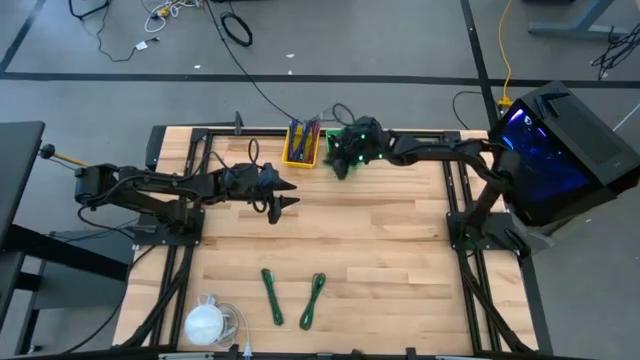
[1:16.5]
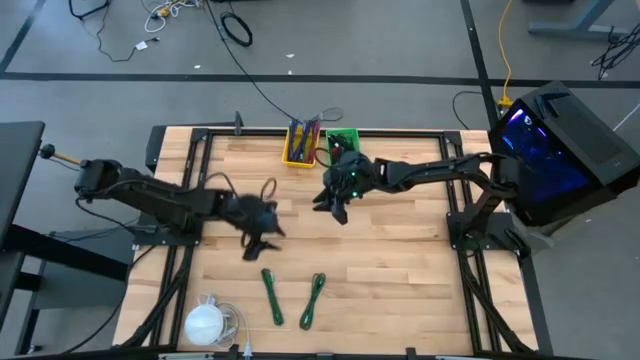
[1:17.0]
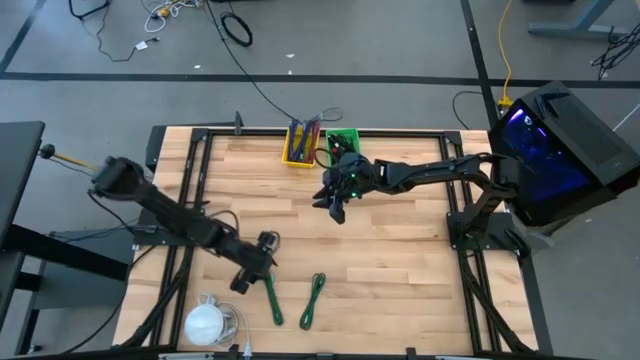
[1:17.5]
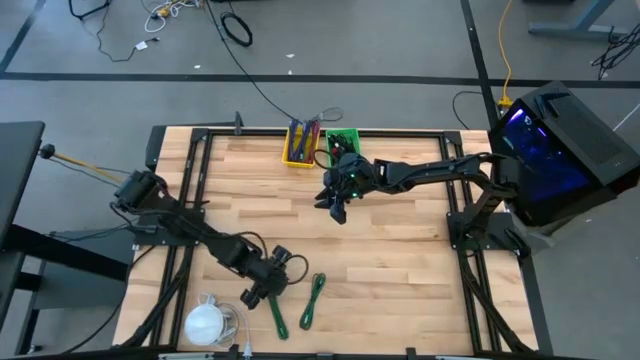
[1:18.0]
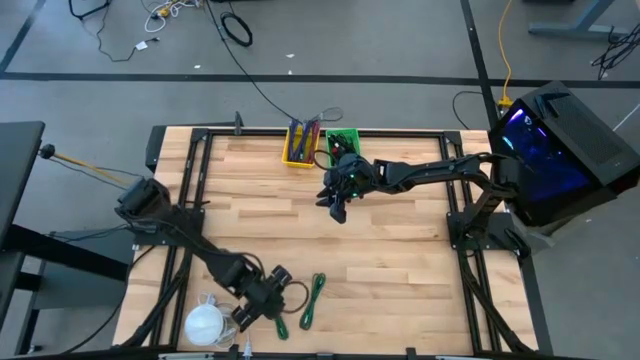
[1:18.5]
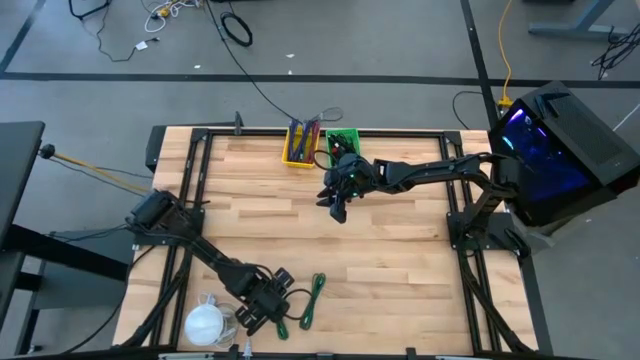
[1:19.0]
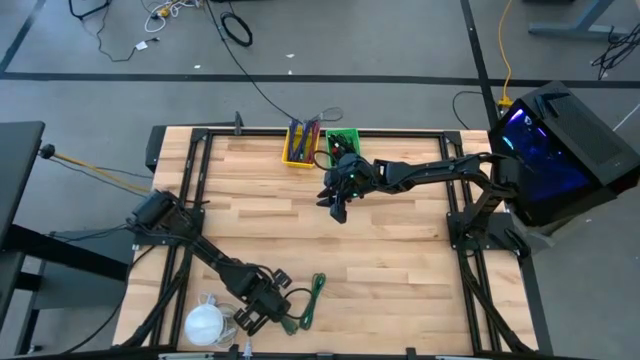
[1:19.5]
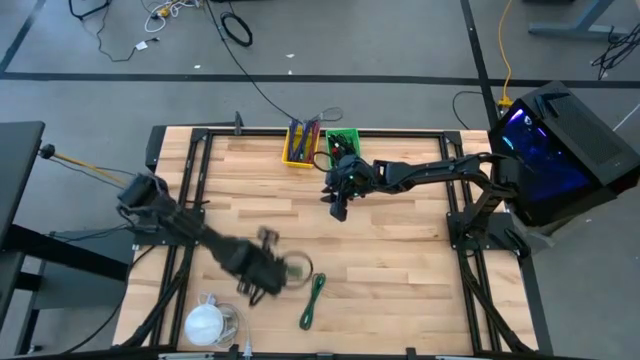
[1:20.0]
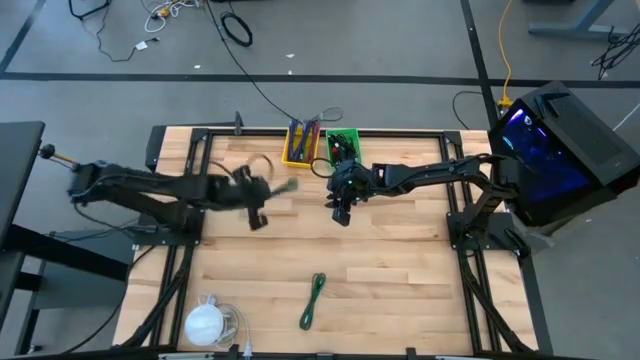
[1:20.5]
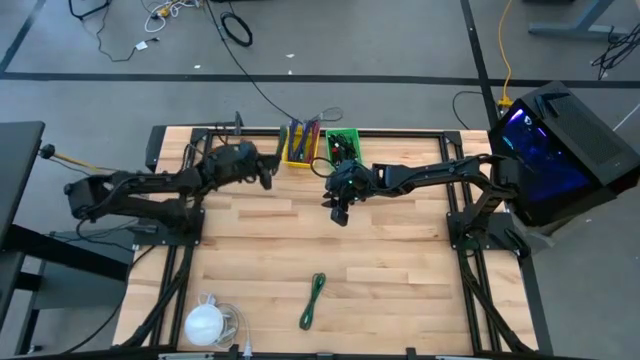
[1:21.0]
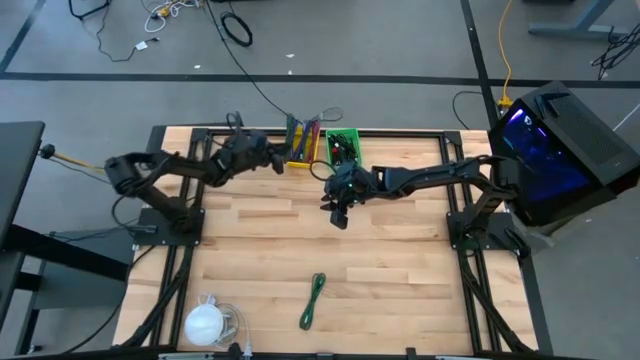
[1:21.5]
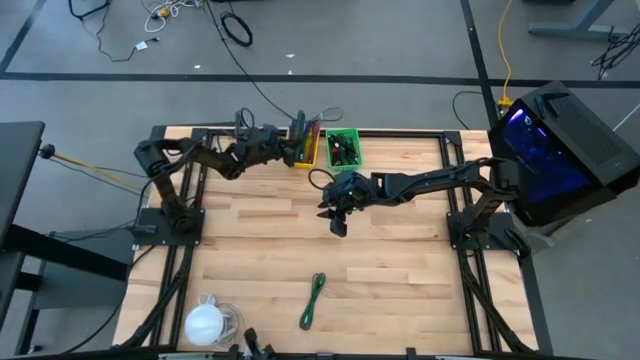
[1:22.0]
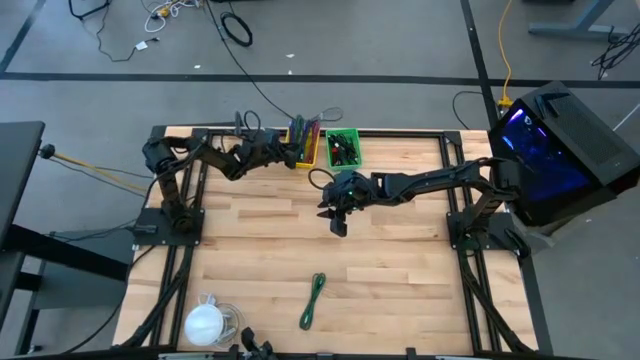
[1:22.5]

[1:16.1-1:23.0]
Task: Pick & Place USB Port
Put the green charger cable into the yellow bin

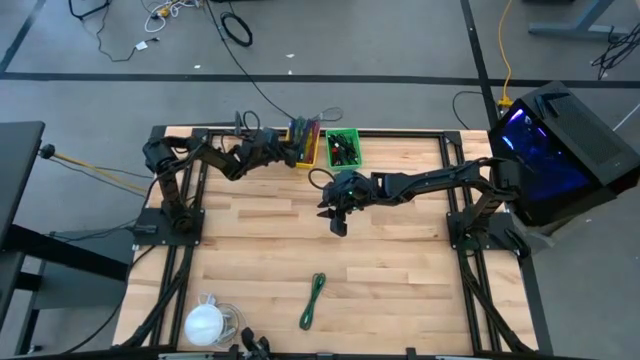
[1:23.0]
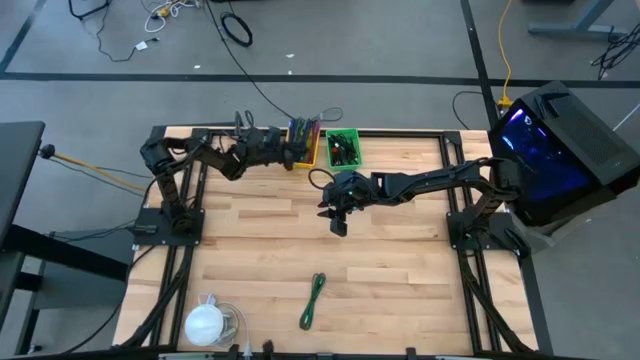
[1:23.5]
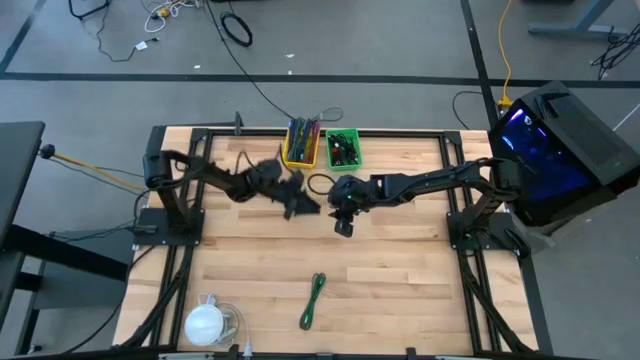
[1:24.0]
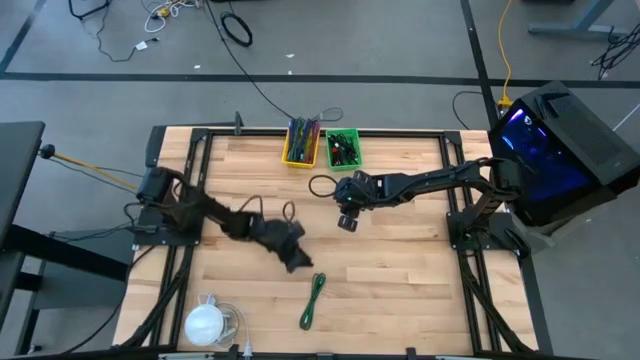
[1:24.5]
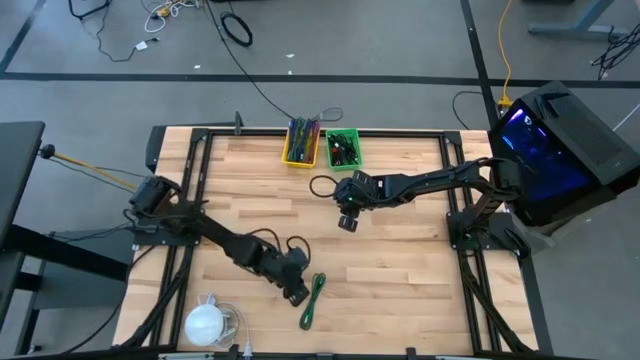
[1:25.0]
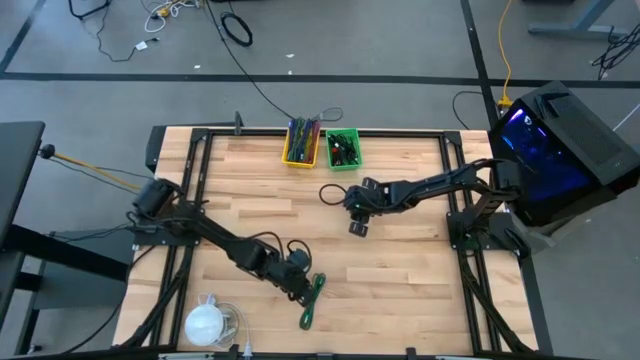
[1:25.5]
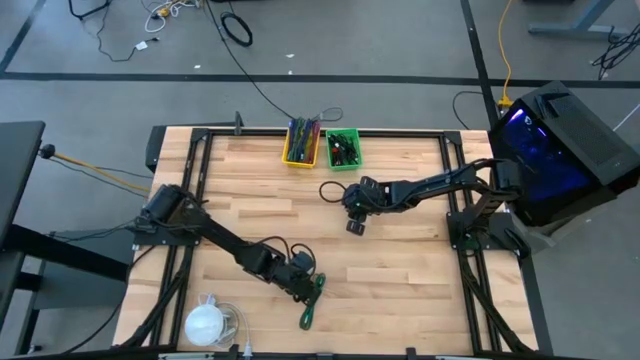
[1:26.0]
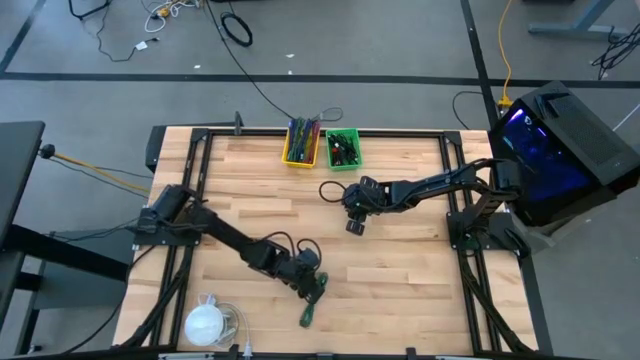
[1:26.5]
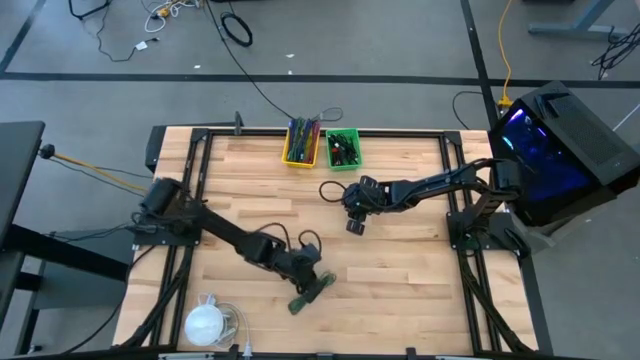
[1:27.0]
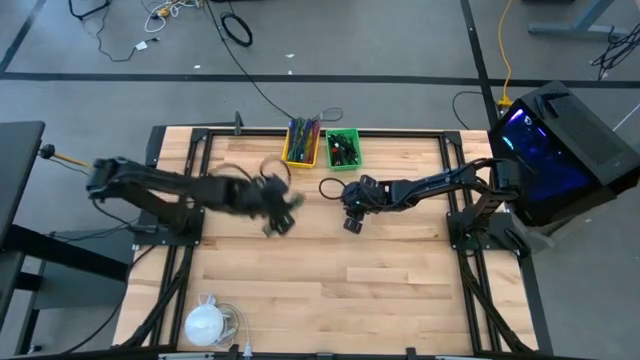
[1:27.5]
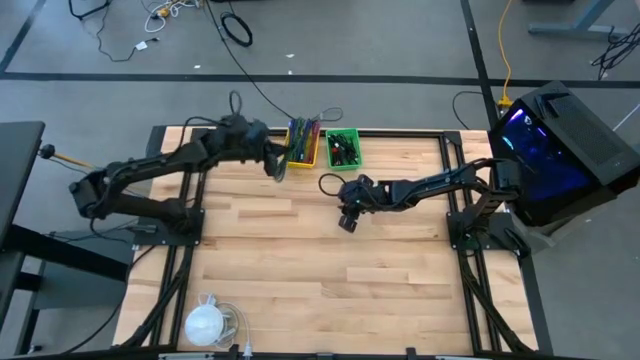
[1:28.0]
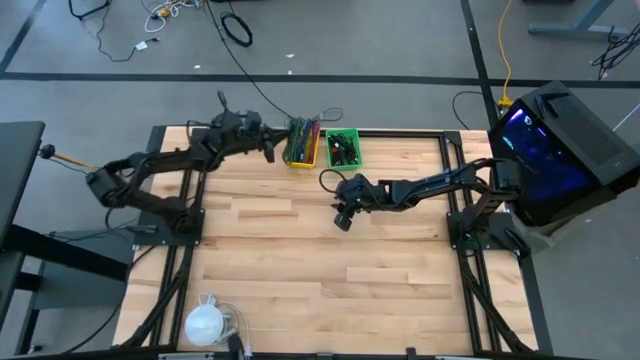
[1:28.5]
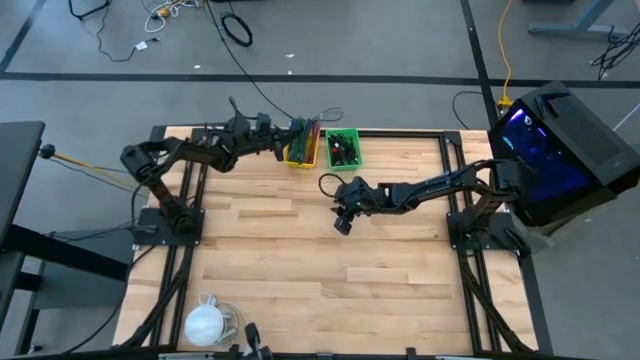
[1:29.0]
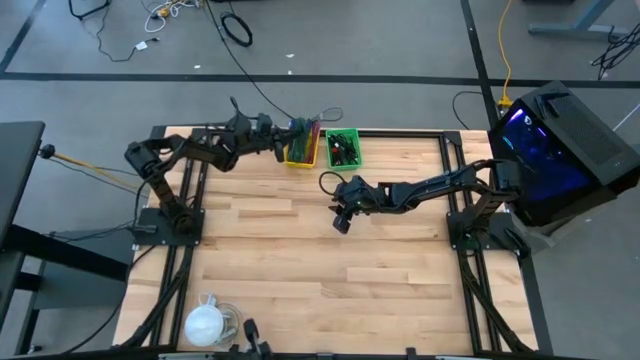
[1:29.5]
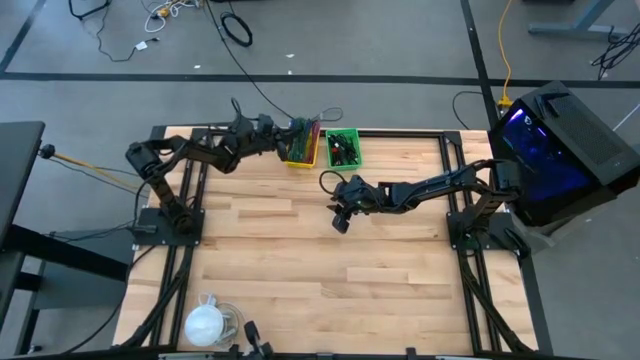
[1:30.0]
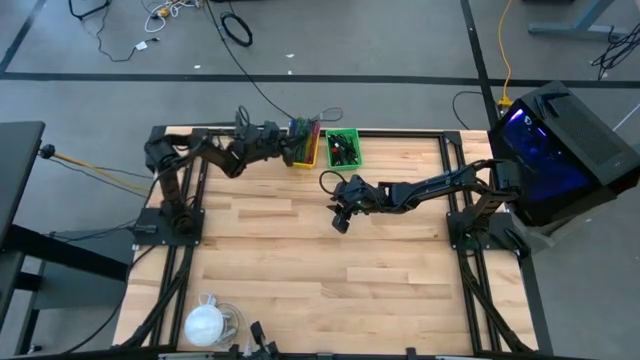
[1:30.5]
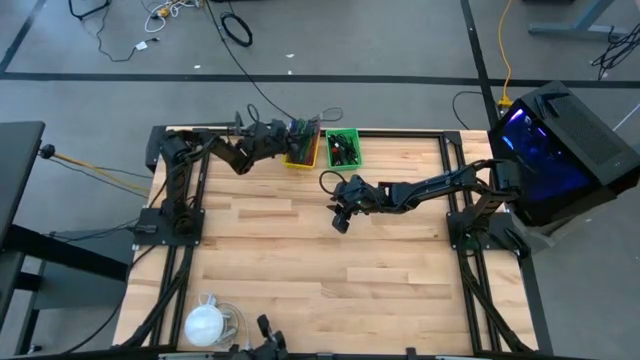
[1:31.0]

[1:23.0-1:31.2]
Put the green charger cable into the yellow bin

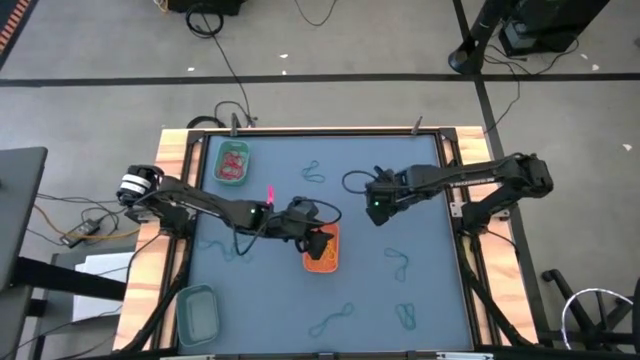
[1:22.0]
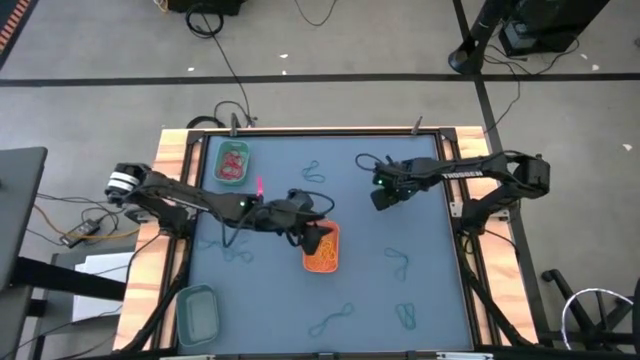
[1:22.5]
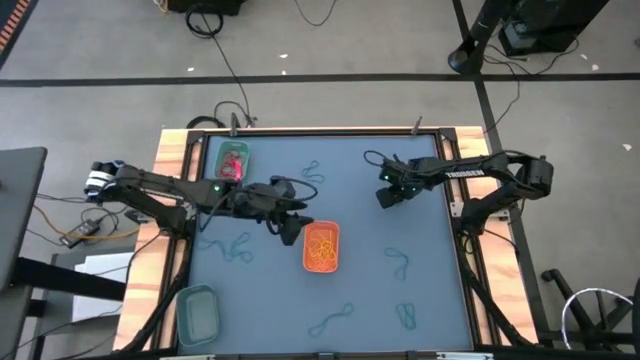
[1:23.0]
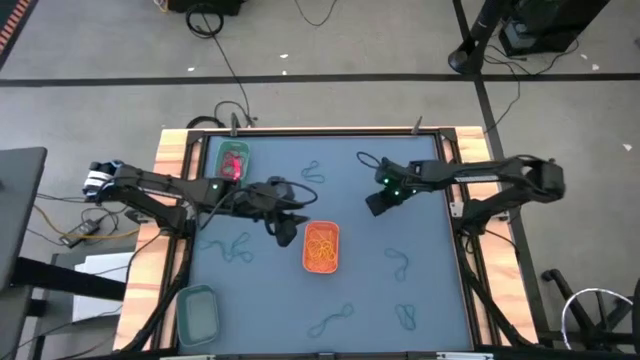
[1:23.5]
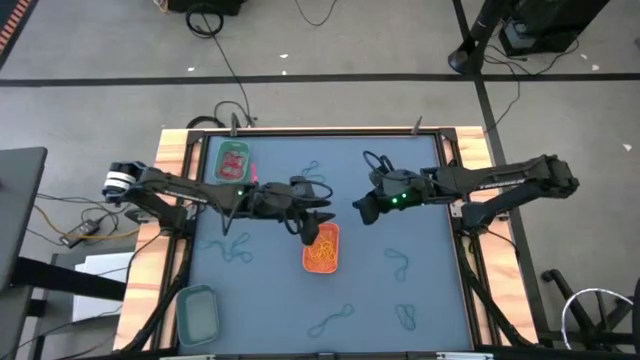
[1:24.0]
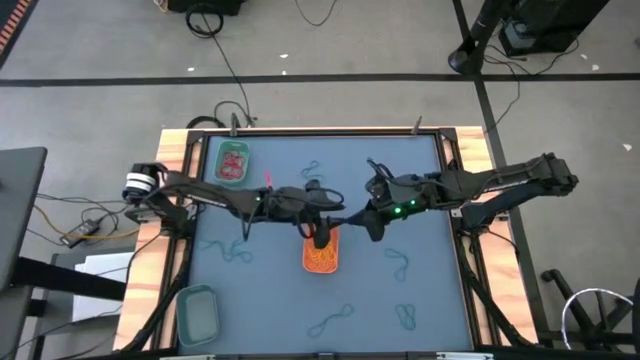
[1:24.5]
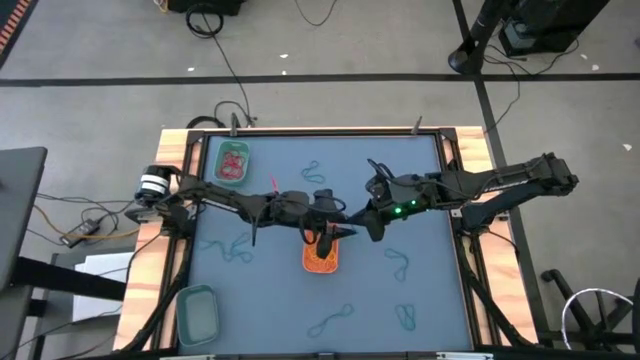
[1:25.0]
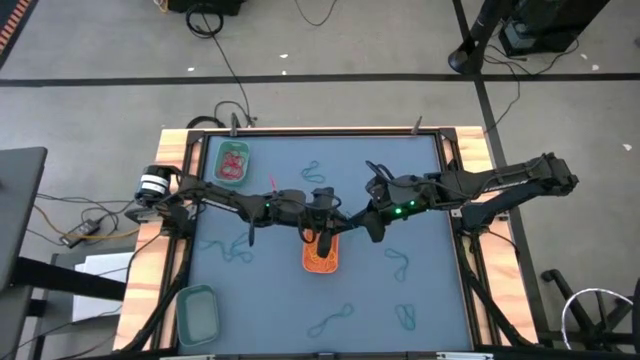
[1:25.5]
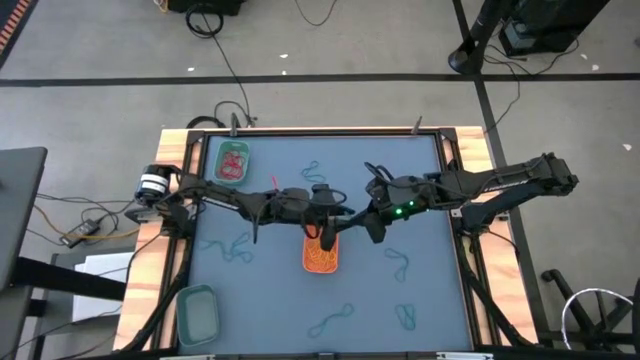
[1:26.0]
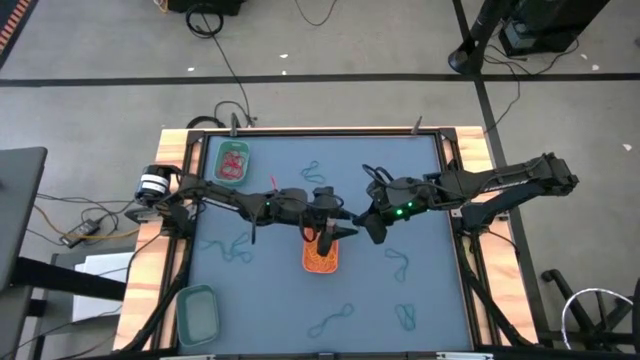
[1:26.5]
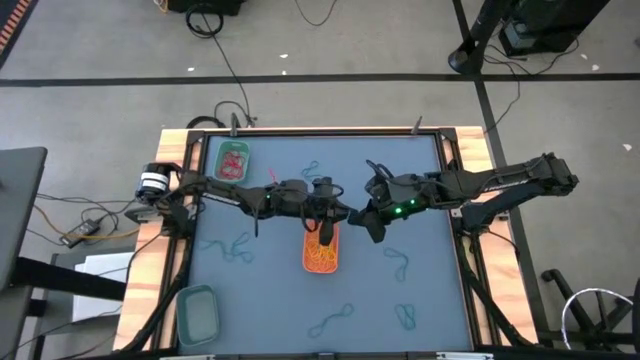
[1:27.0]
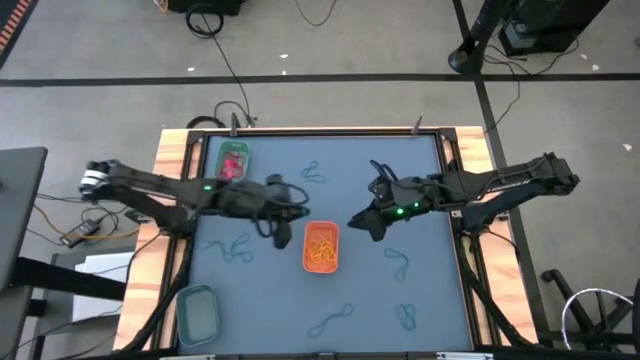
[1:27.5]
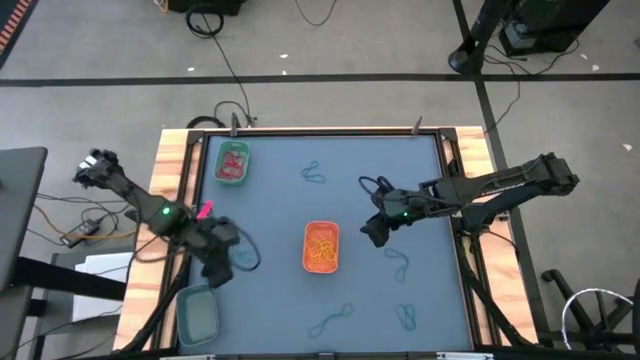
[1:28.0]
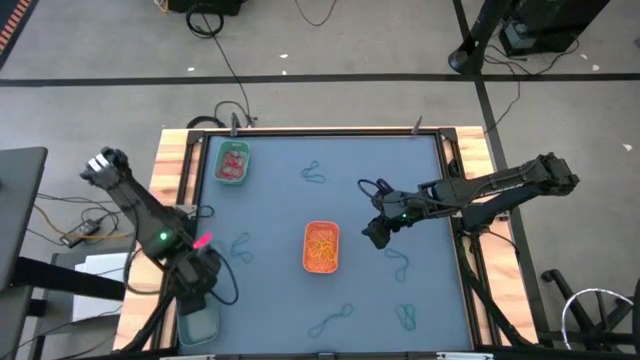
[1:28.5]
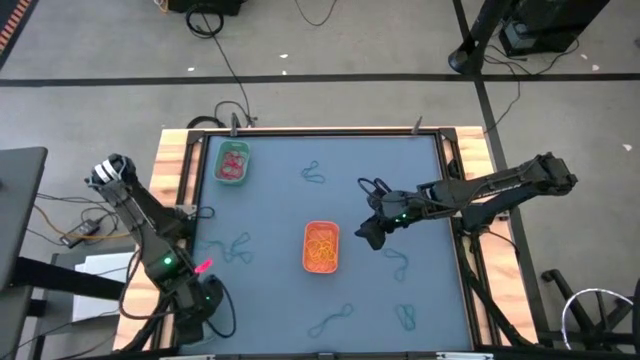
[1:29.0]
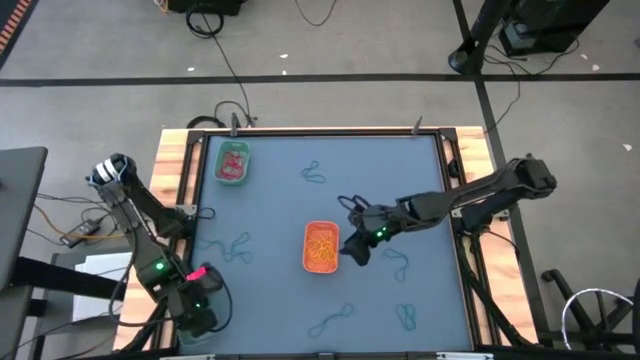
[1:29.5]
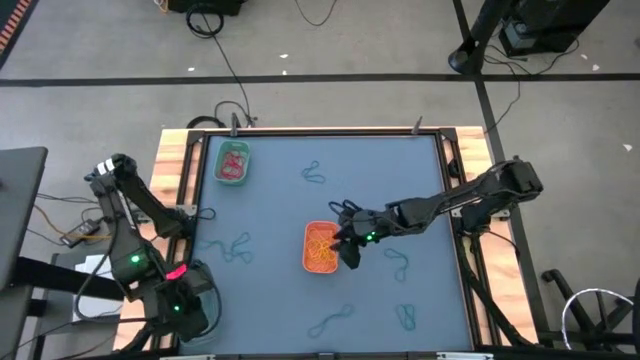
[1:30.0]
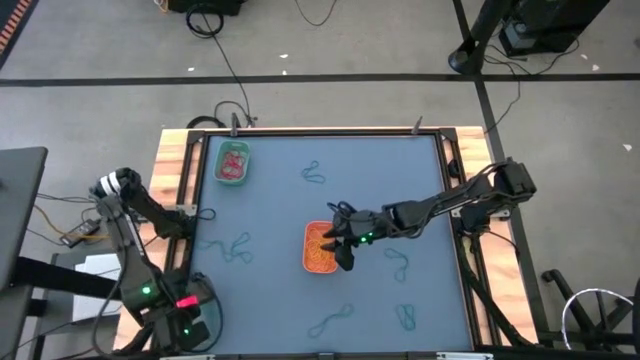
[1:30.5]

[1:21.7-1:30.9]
Task: Sort rubber bands into baskets
Put the blue rubber band into the blue bin
